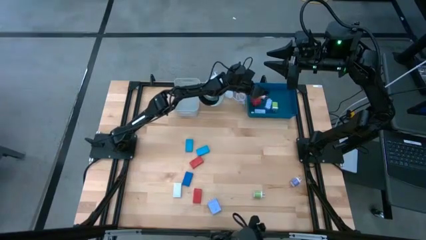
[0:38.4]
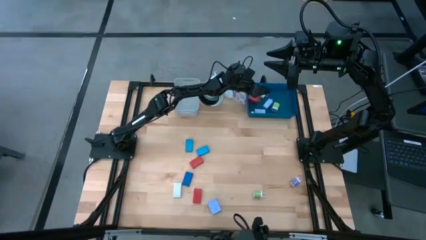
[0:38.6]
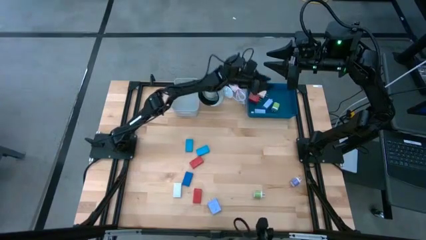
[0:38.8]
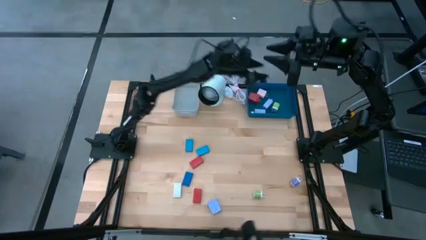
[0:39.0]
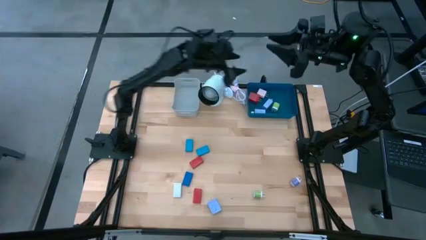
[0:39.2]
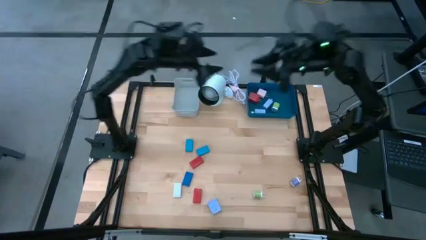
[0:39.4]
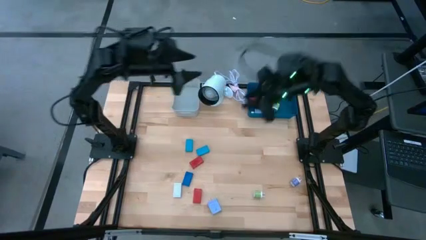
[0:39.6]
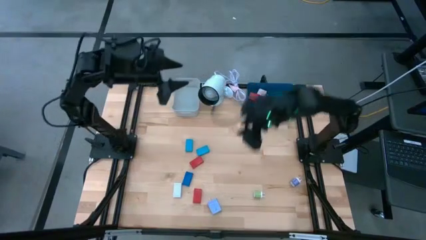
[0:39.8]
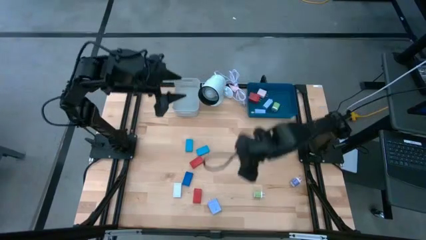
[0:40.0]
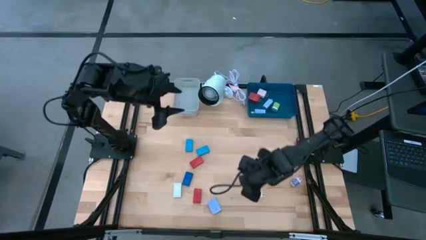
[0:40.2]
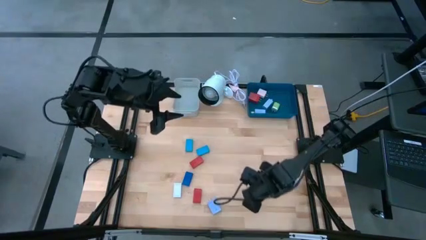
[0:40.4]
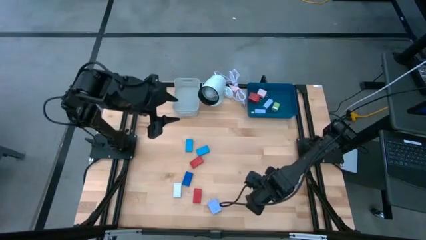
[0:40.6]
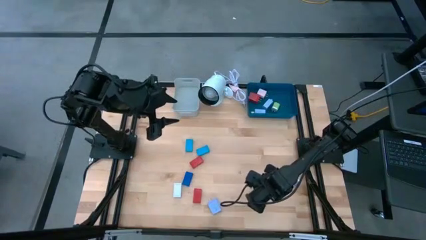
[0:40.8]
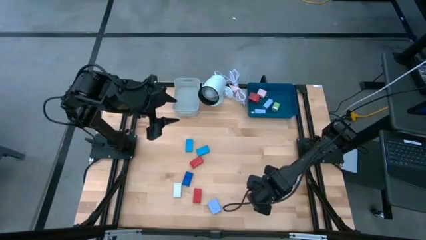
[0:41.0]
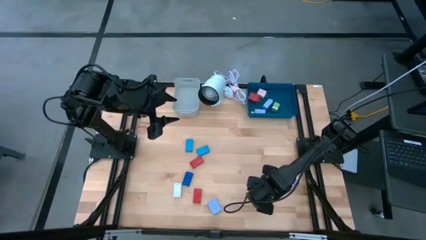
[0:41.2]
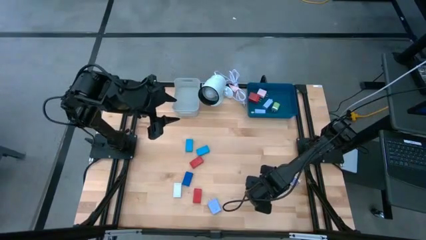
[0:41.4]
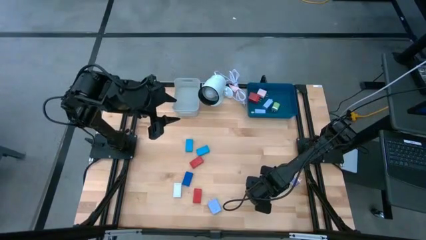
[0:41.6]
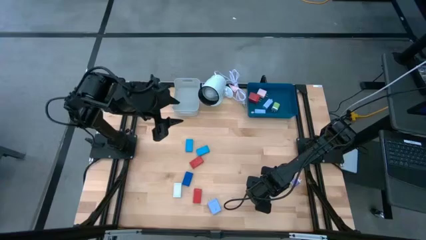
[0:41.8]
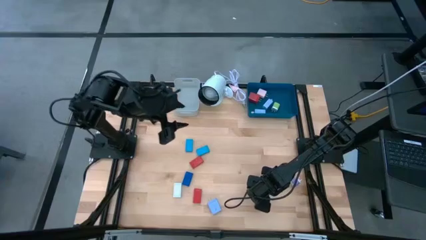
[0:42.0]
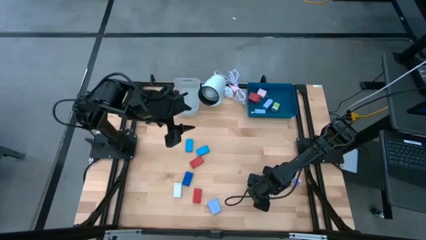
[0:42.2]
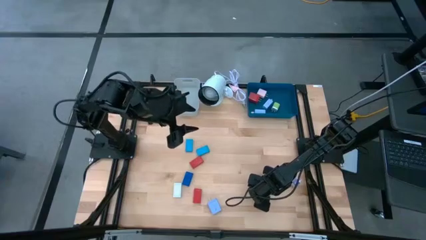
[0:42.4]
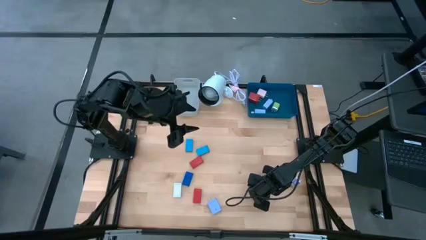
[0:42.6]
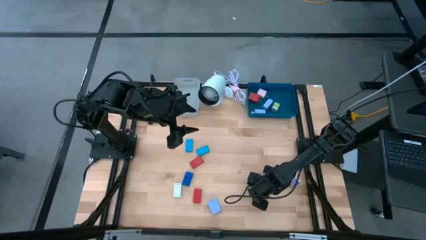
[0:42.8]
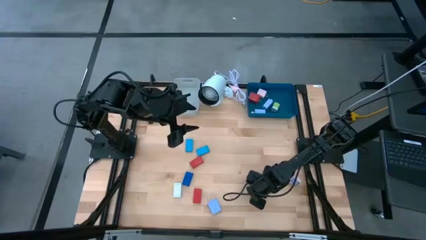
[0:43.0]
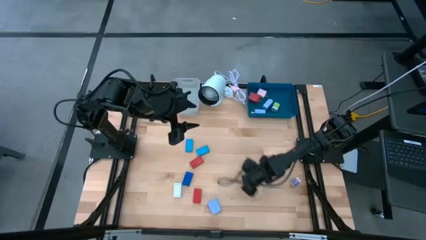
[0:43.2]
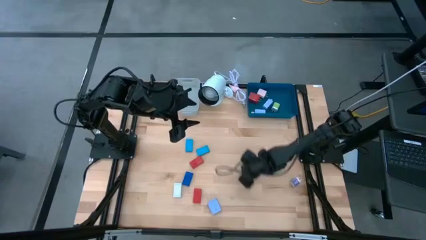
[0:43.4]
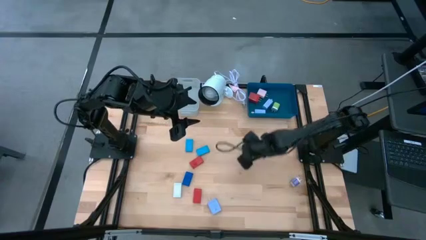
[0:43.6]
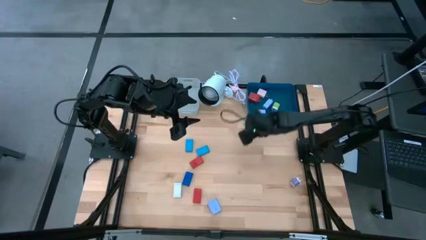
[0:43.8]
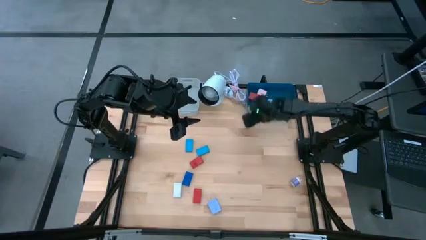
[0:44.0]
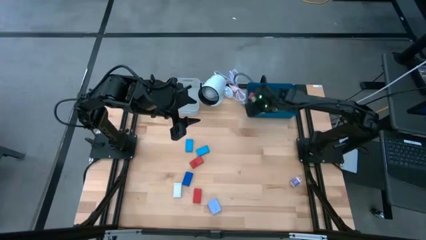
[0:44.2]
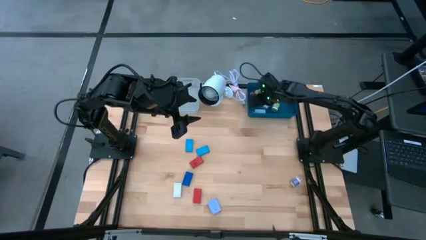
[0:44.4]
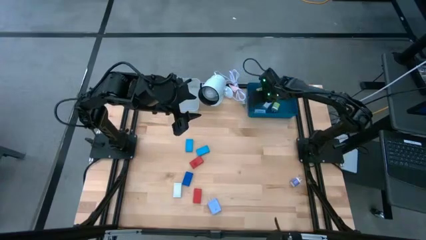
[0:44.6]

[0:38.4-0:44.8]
Task: Pick & Place Office items
Put the green charger adapter into the blue bin

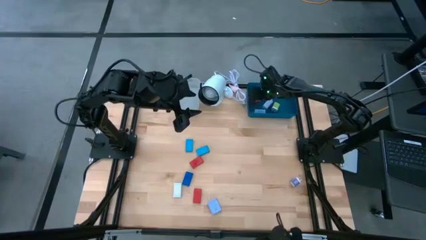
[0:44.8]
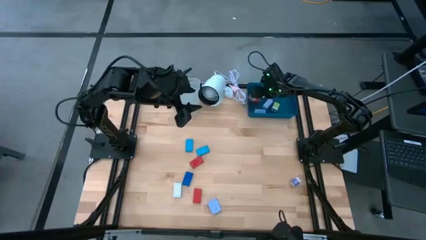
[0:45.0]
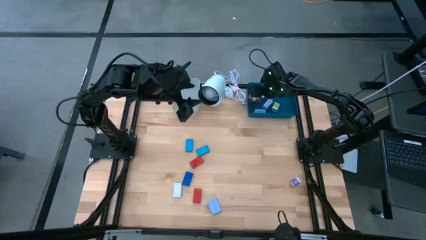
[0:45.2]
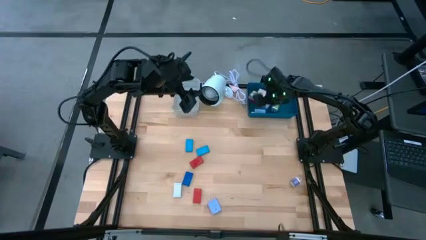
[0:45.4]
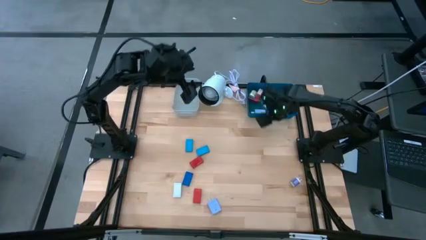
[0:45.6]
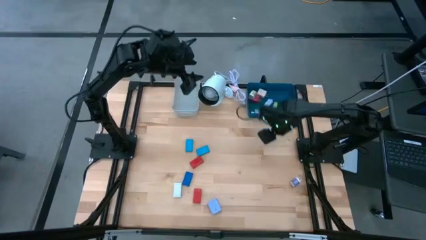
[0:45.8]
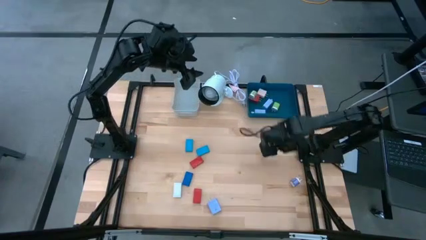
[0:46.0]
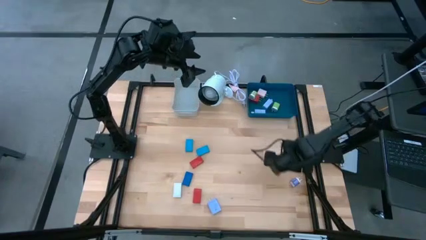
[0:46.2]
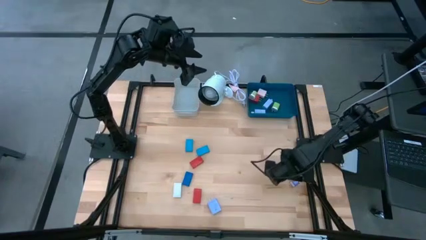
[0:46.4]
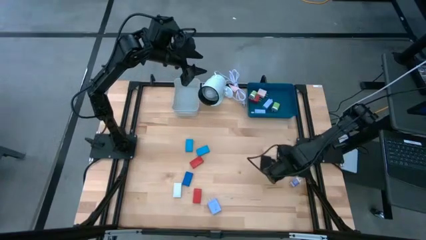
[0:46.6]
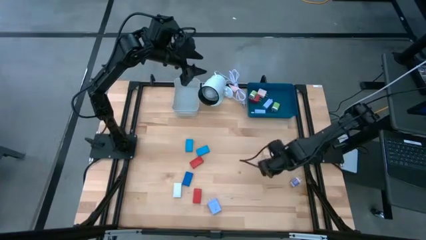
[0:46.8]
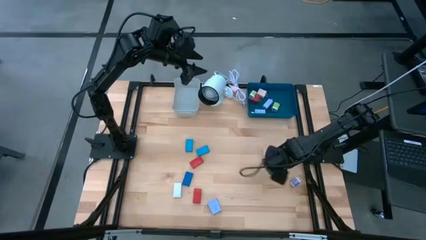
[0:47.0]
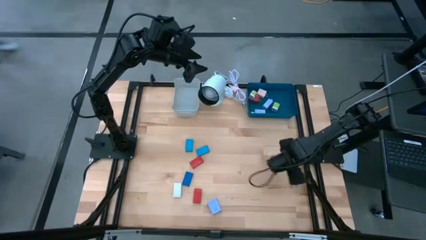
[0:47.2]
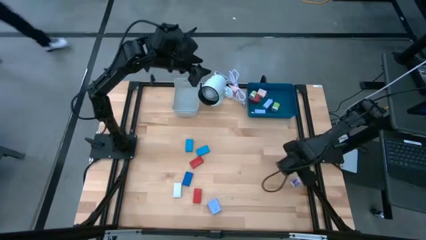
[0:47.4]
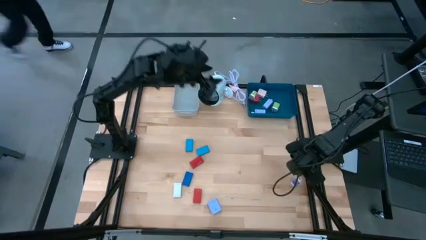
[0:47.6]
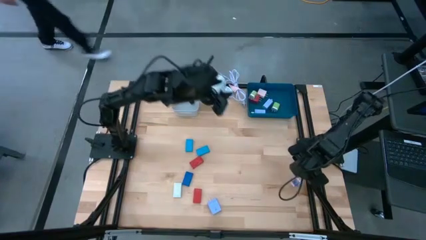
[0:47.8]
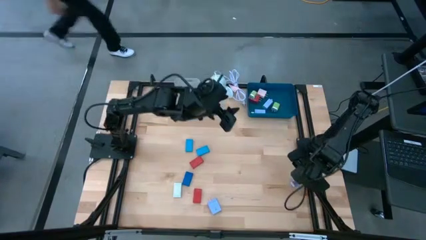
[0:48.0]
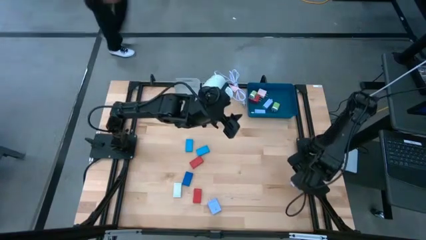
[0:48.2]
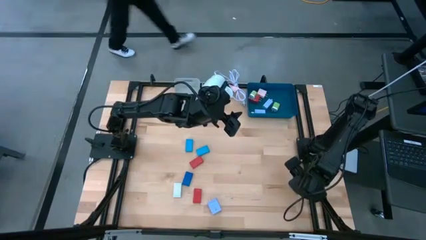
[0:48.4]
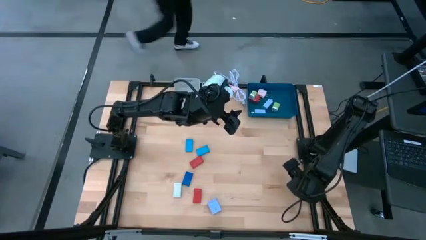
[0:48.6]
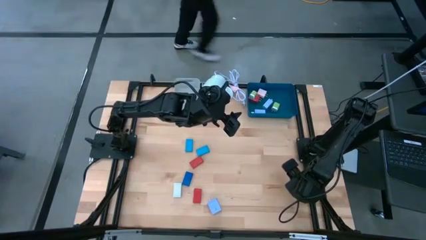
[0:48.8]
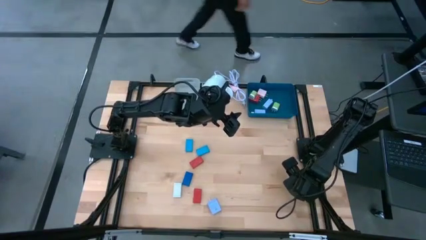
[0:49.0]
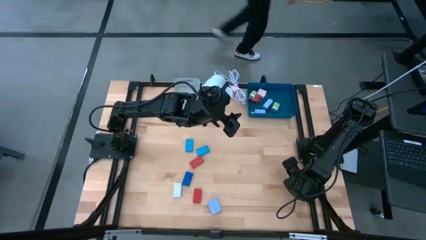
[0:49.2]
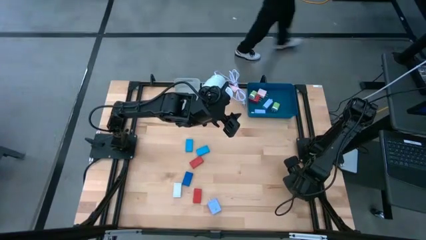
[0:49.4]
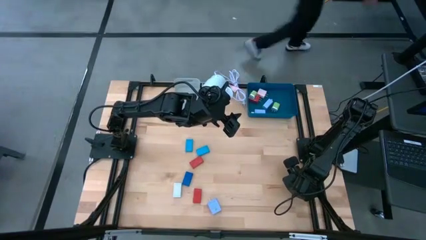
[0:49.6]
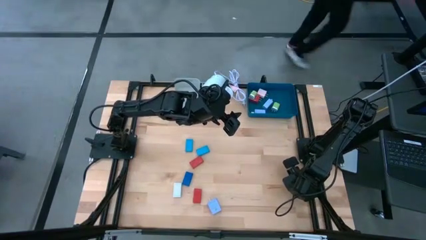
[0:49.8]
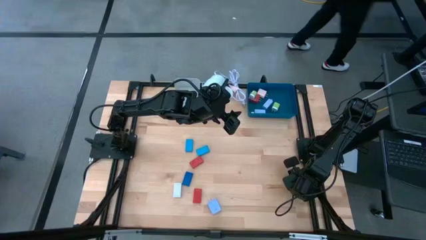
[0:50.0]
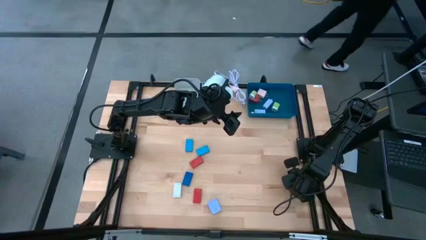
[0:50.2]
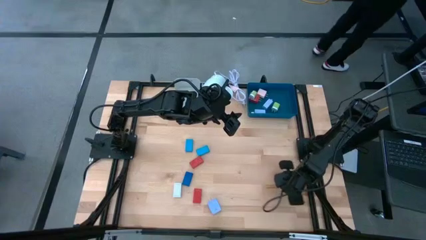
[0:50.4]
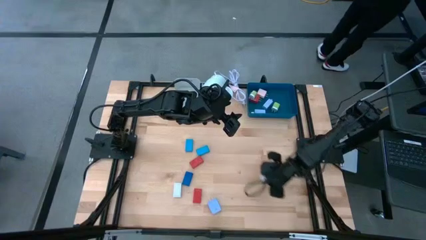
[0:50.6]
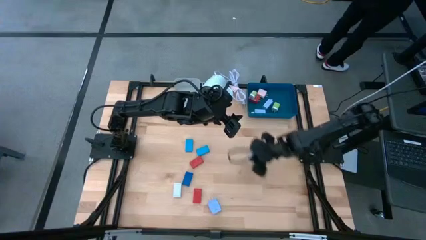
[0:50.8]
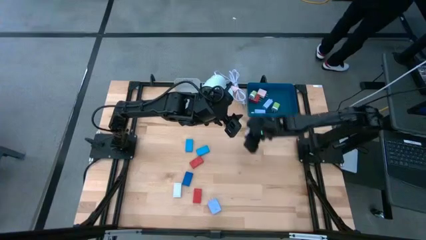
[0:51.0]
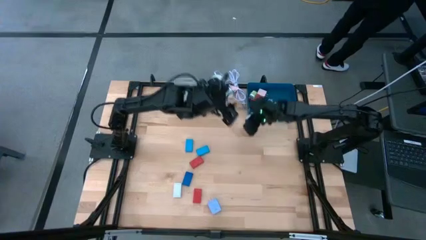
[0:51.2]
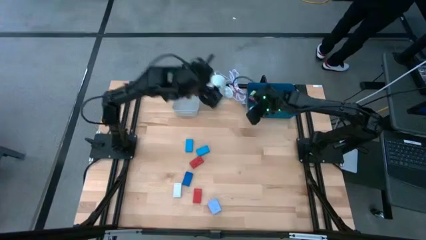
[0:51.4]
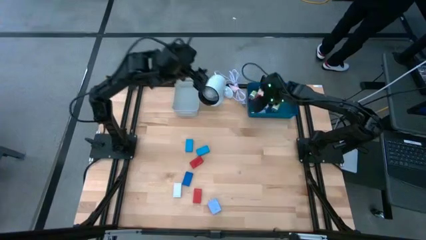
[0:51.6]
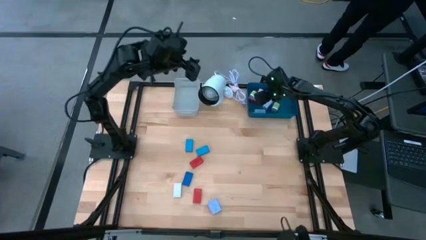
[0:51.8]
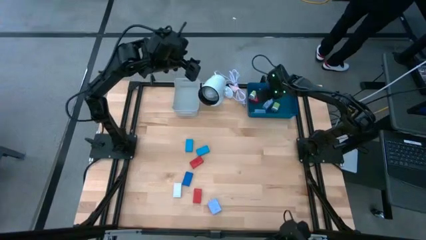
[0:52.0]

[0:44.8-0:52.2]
Put the purple charger adapter into the blue bin

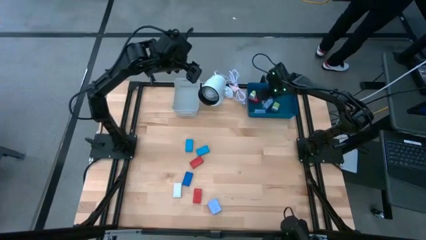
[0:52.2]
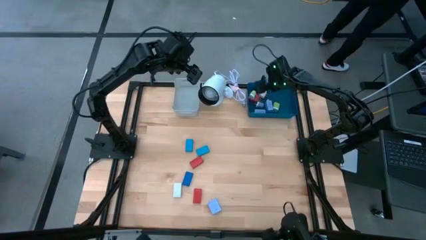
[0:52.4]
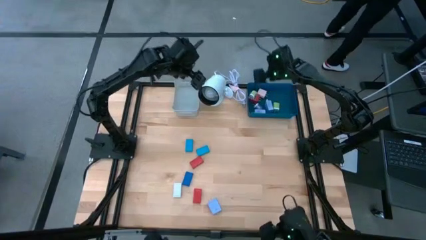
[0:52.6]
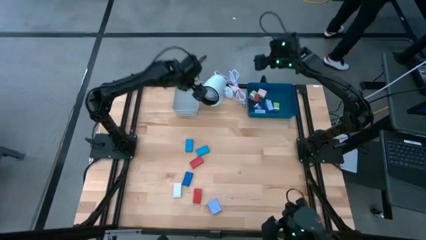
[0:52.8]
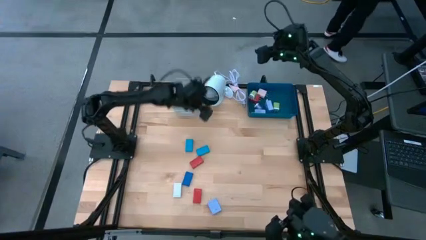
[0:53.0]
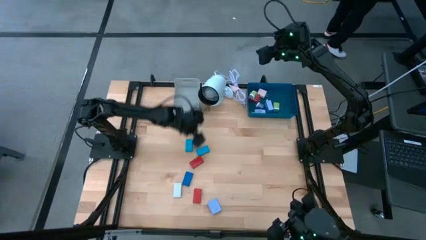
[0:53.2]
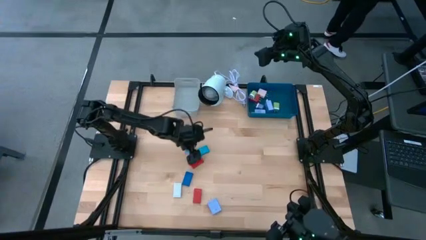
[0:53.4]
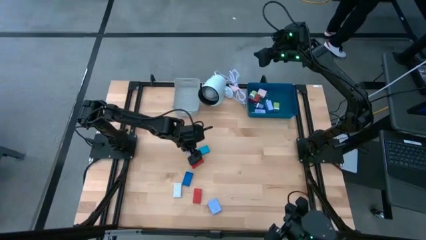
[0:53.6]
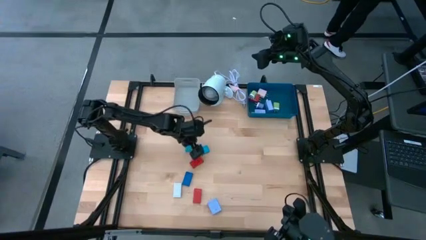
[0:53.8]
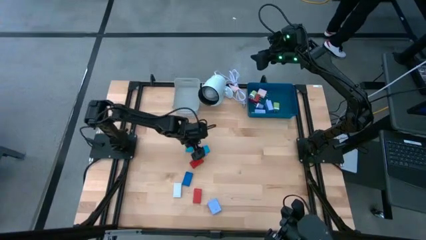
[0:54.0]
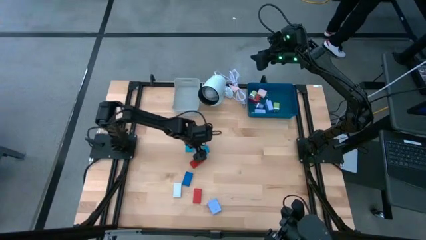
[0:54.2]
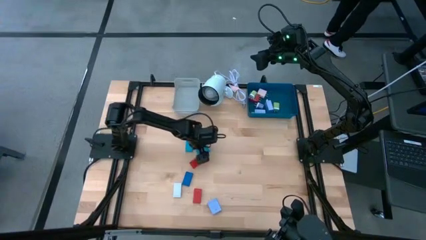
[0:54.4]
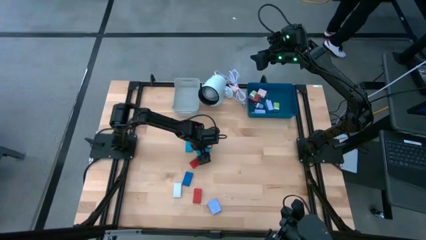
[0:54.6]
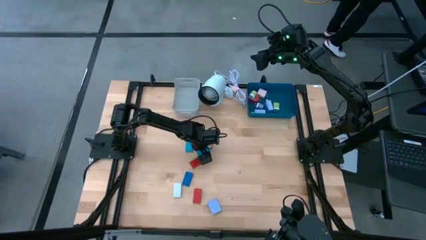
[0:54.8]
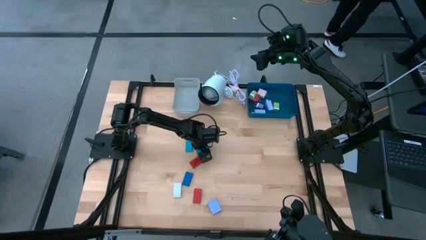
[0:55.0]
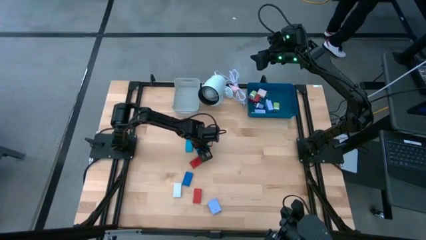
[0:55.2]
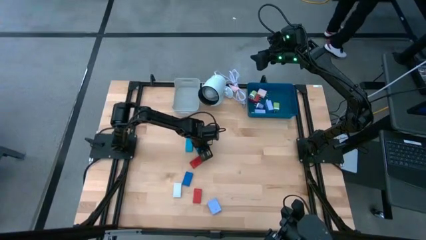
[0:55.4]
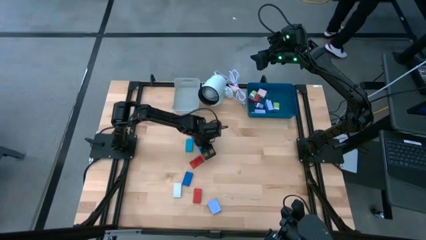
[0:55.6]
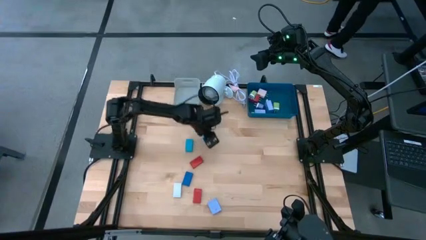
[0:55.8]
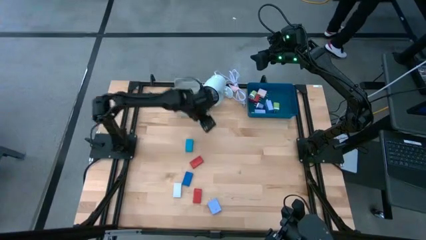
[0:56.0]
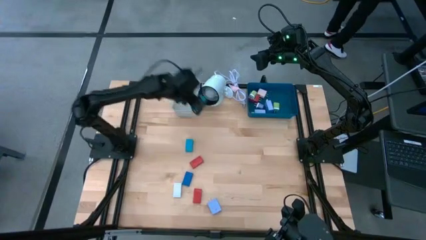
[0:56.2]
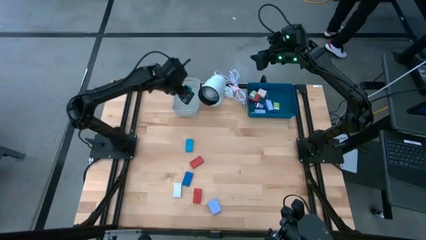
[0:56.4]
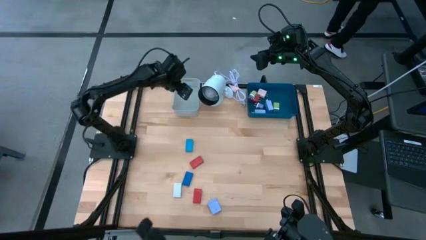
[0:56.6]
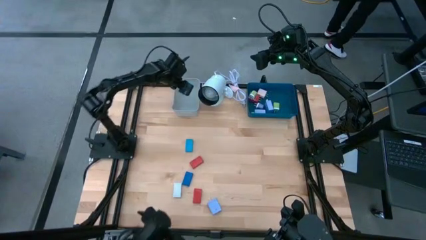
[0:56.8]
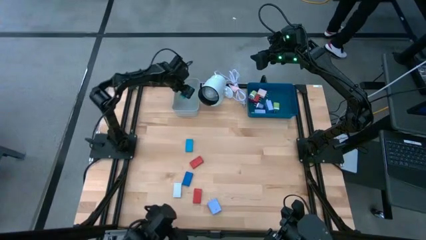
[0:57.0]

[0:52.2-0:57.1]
Put the right blue timer into the gray bin
